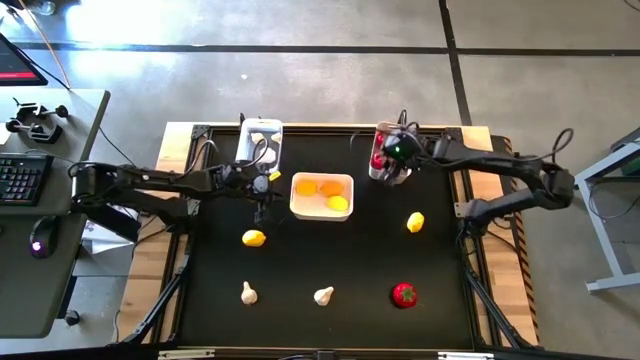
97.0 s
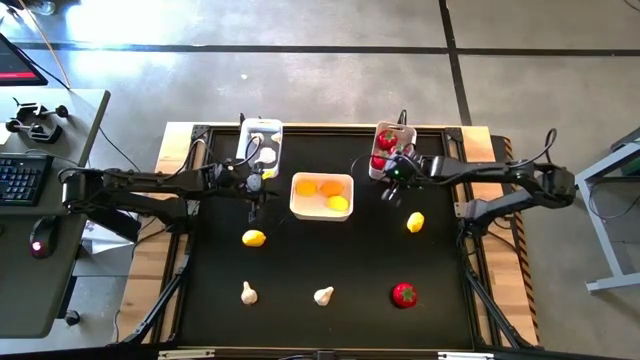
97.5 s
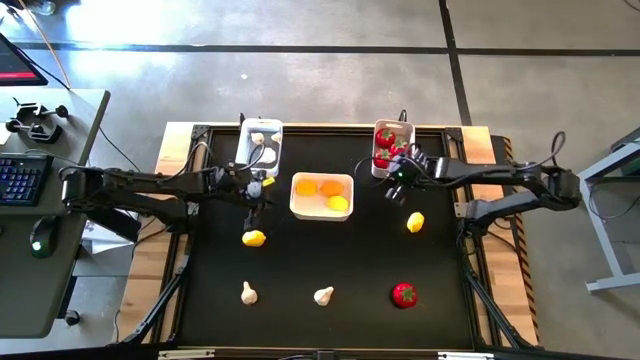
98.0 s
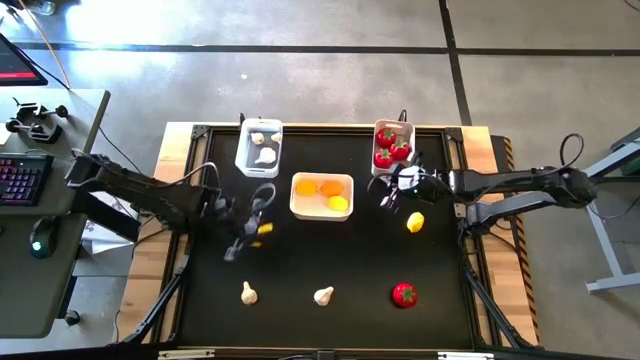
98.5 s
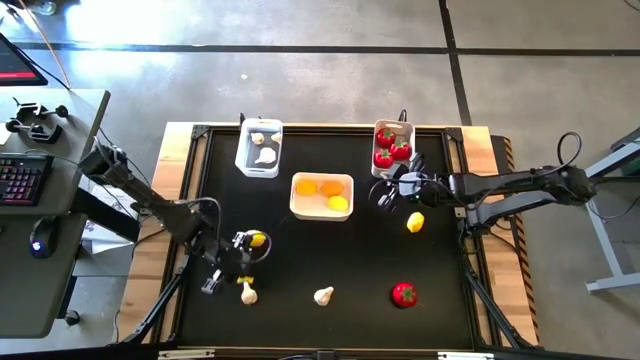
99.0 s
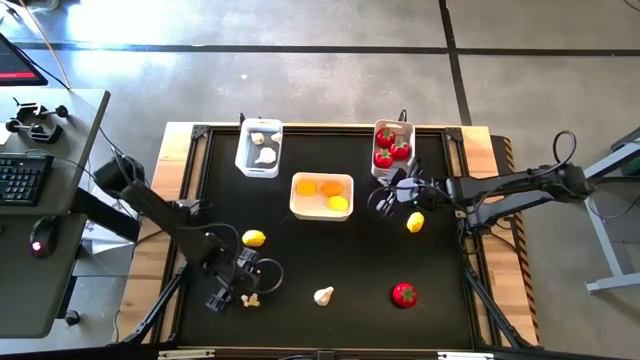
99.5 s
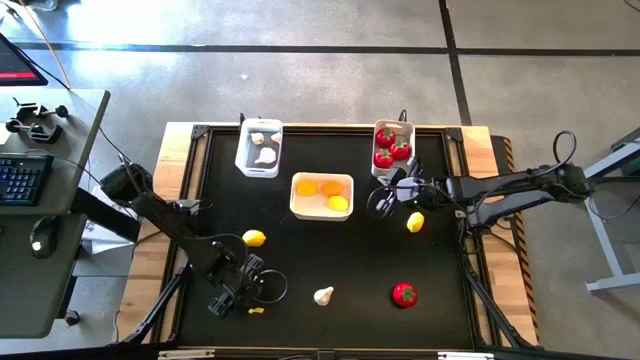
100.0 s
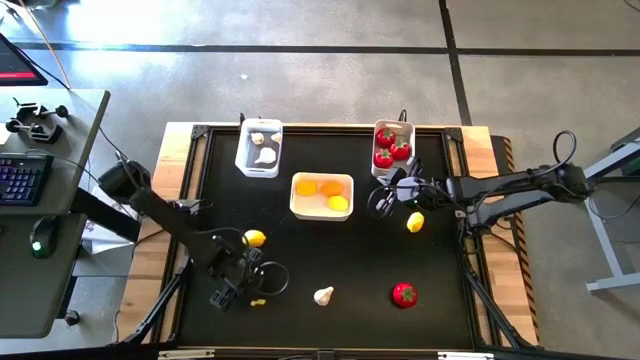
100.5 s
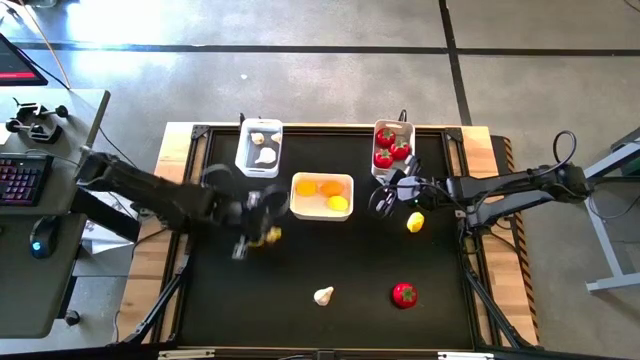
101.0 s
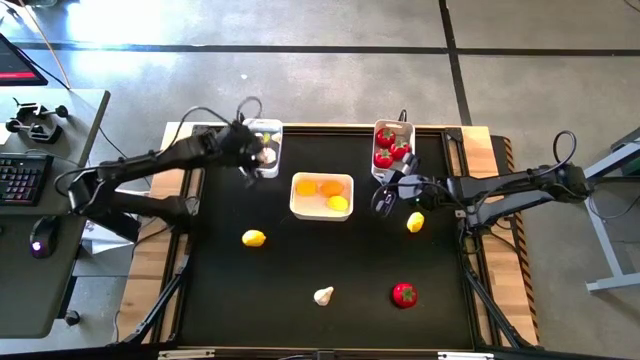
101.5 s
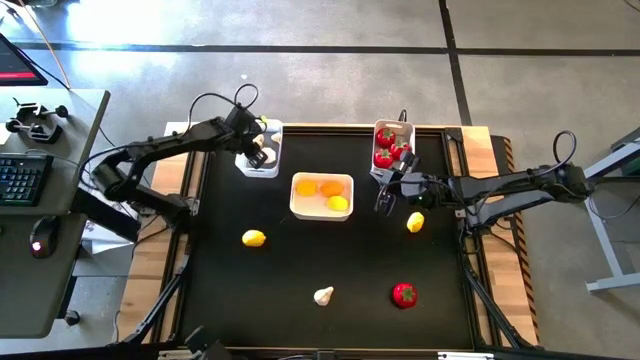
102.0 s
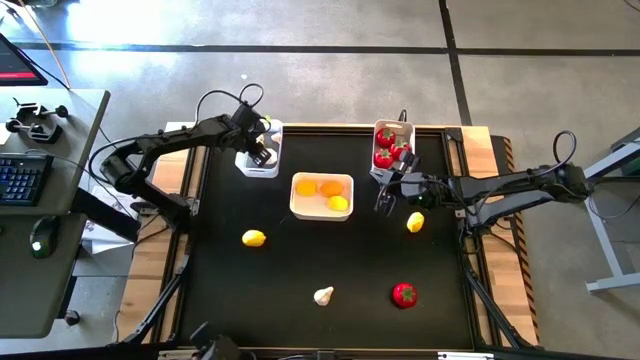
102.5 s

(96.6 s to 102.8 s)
Task: Sort produce into baskets
Put the white garlic into the transparent bin

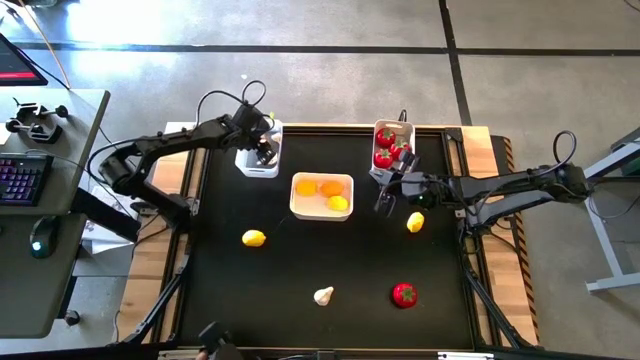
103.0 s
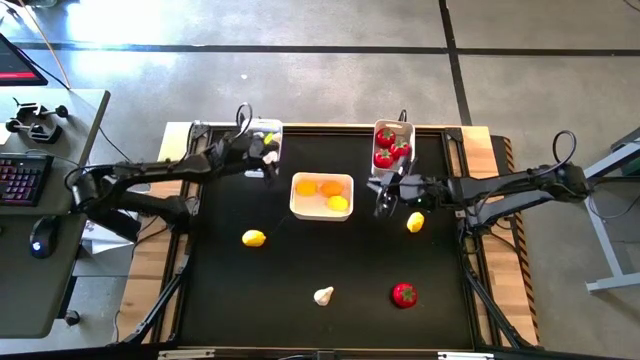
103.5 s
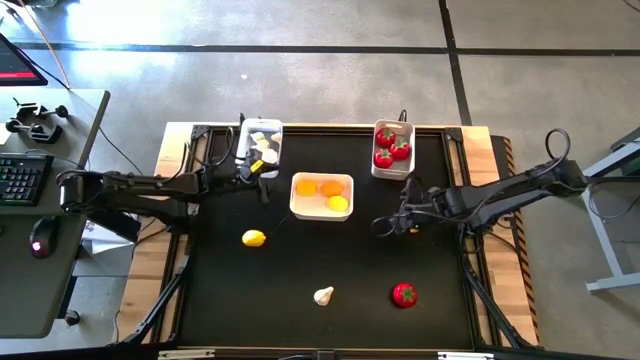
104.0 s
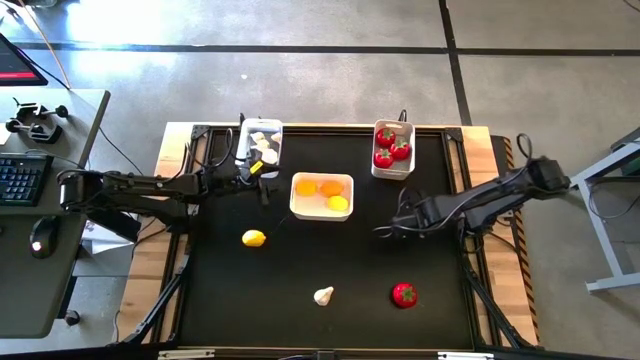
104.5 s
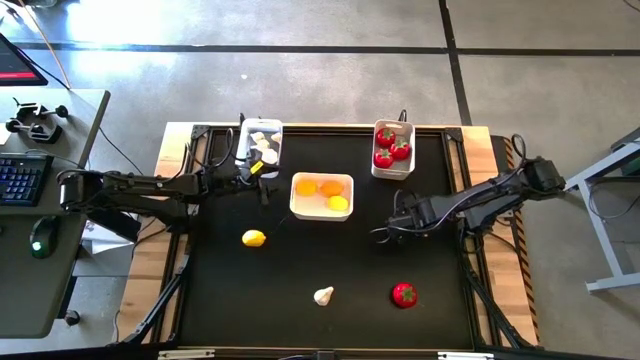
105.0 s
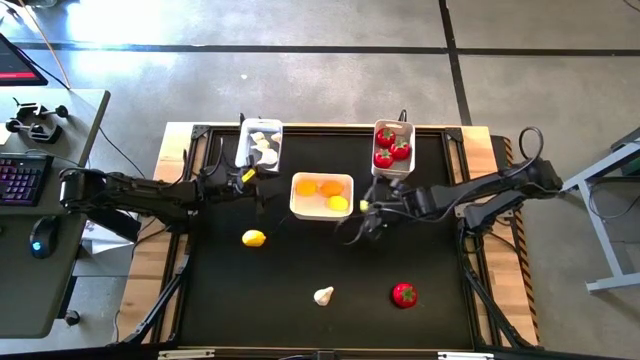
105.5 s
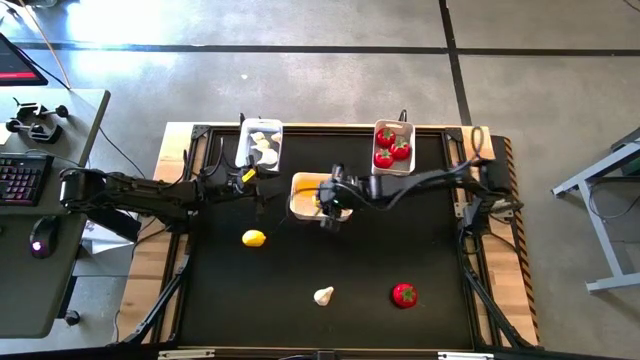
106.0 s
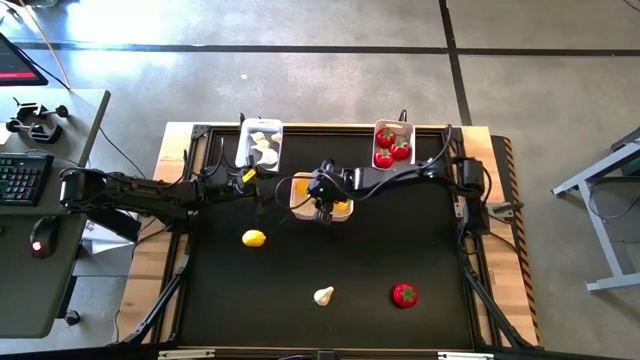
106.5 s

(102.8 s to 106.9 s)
Put the yellow lemon into the white bin

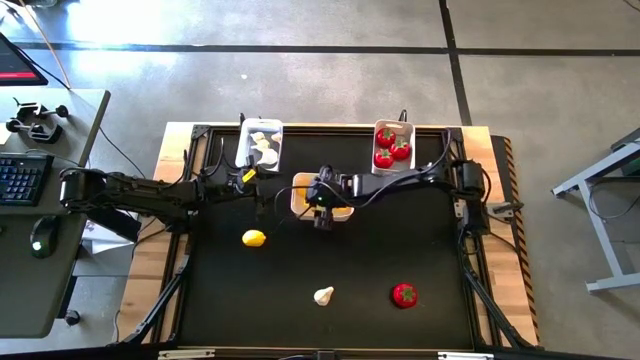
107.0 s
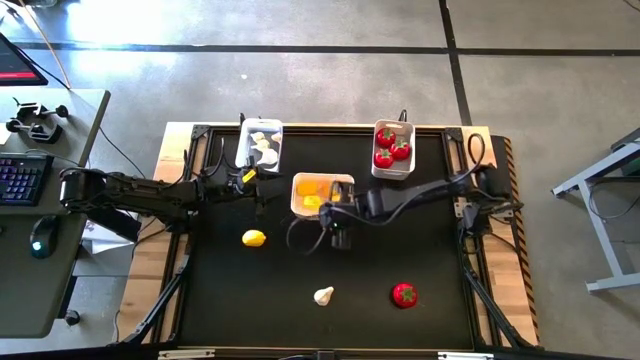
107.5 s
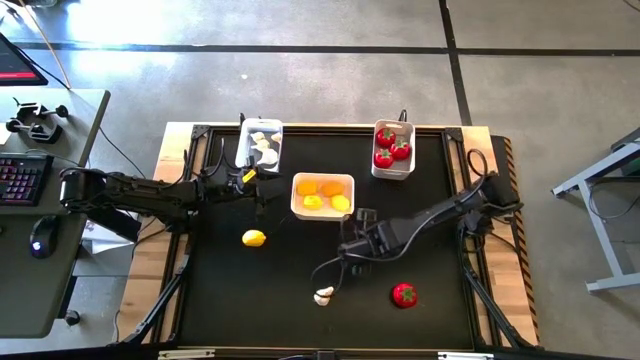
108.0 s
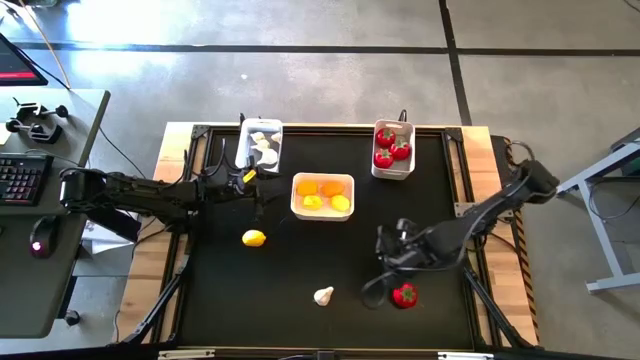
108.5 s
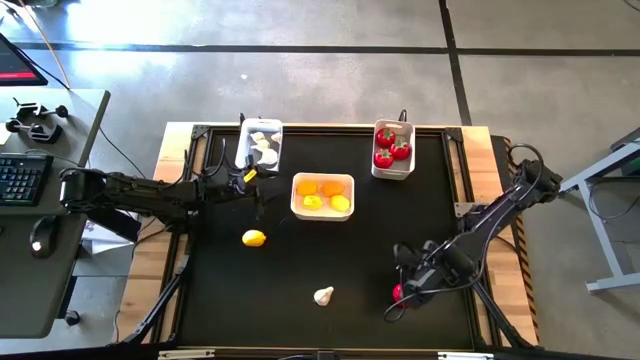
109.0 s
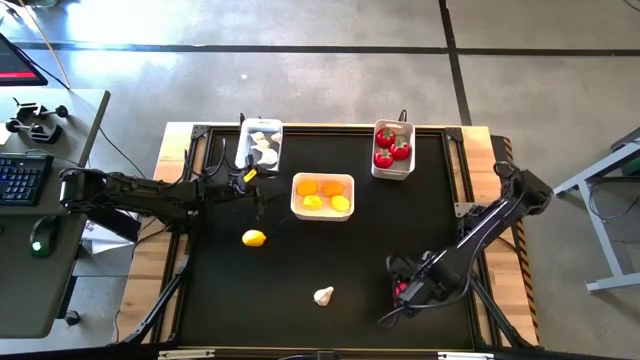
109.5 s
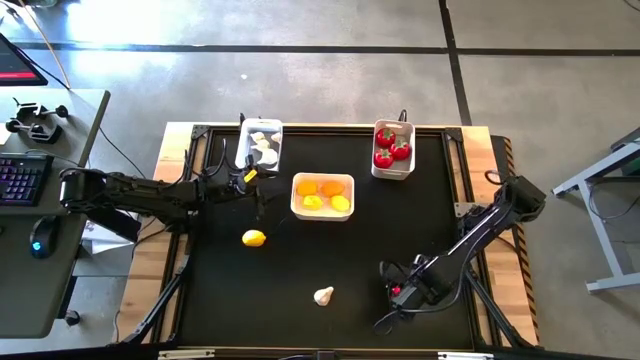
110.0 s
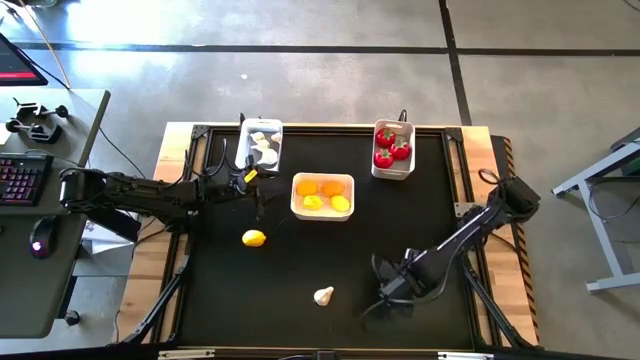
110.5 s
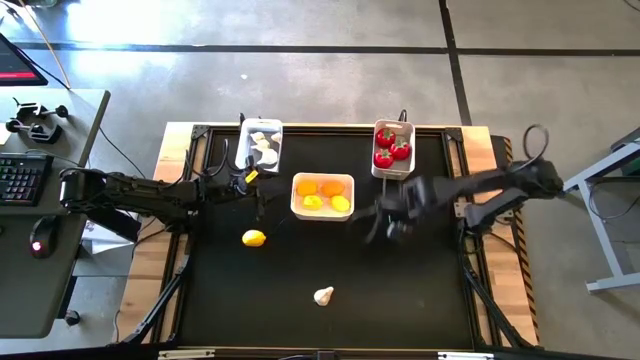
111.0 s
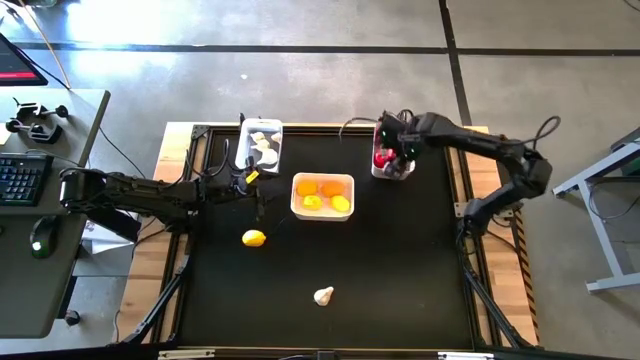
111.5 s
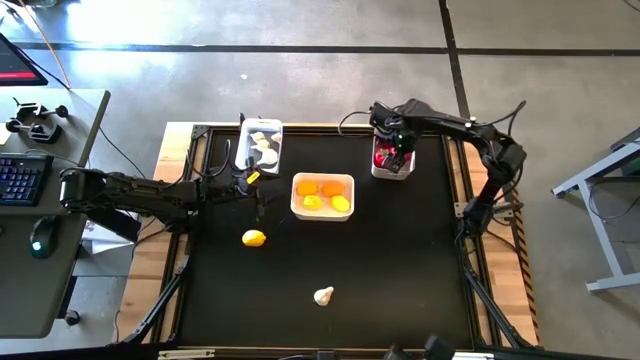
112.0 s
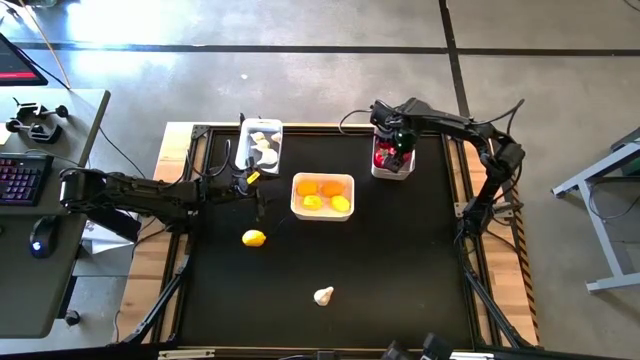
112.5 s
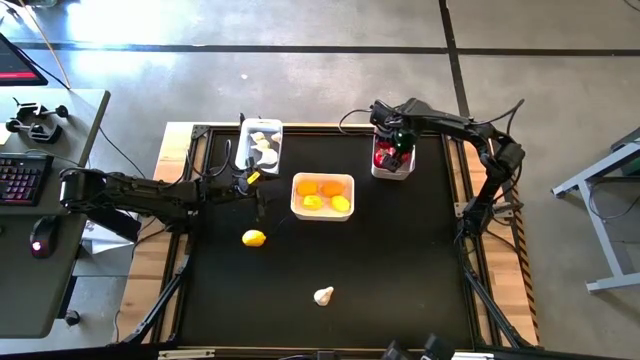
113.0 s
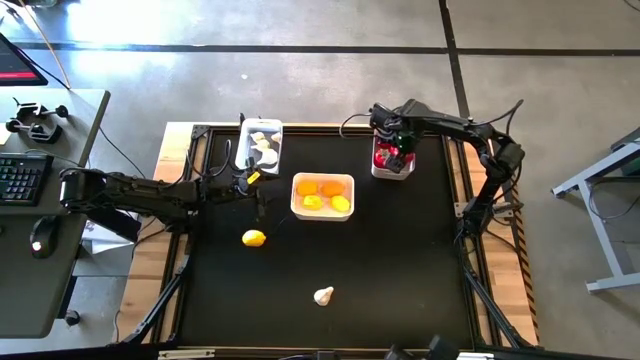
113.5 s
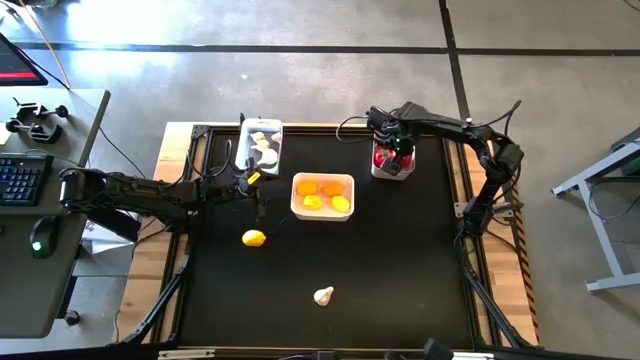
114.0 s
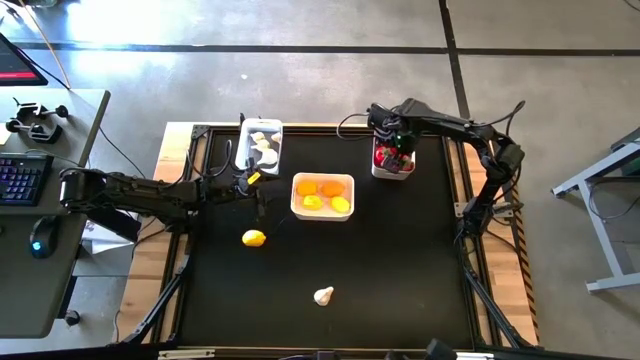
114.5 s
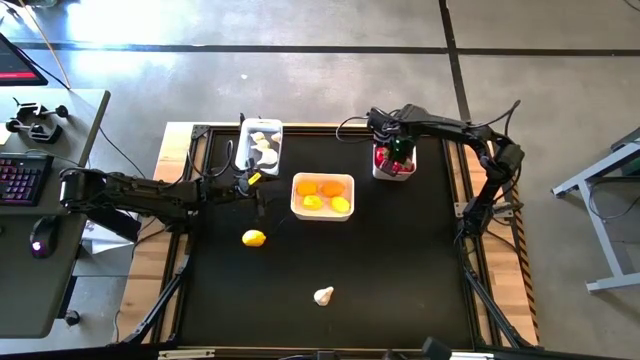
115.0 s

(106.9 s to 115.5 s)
Put the red tomato into the gray bin

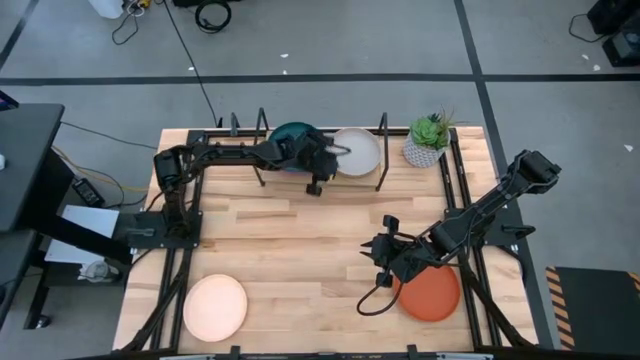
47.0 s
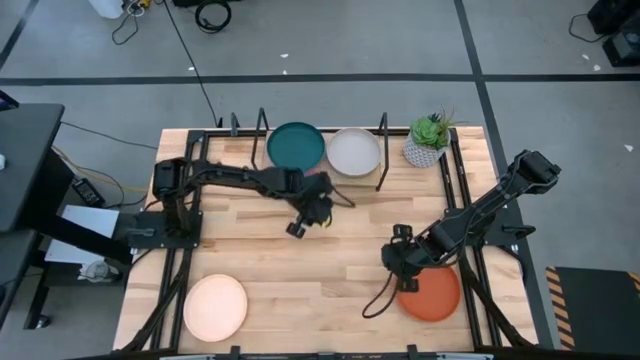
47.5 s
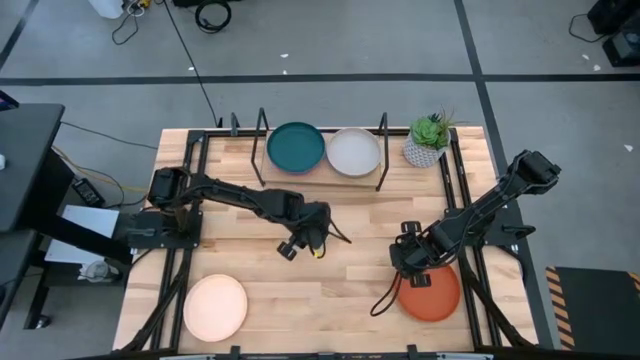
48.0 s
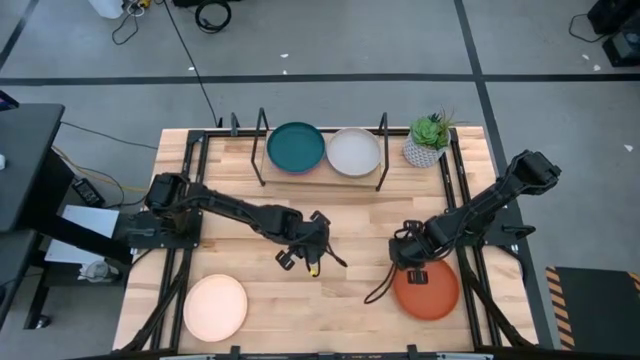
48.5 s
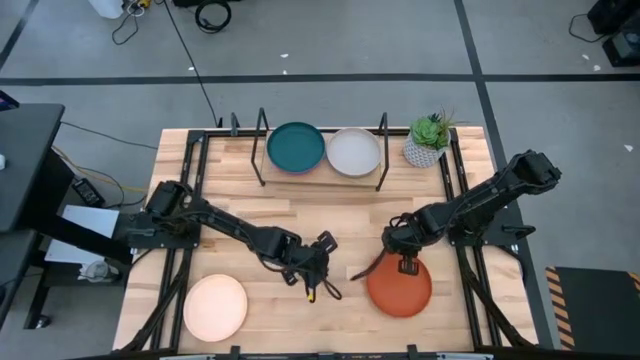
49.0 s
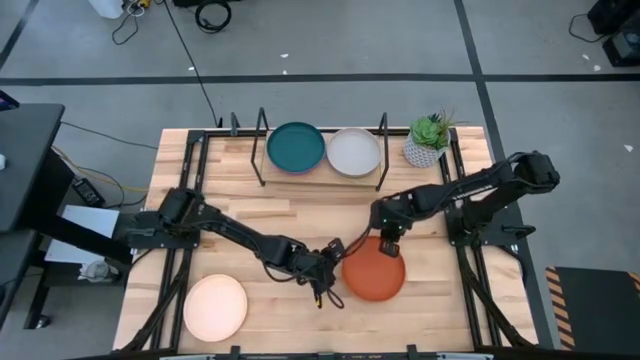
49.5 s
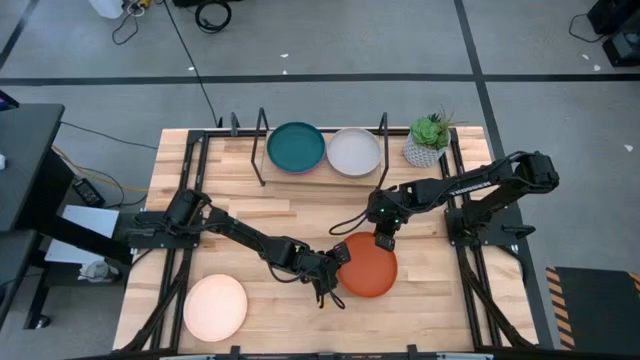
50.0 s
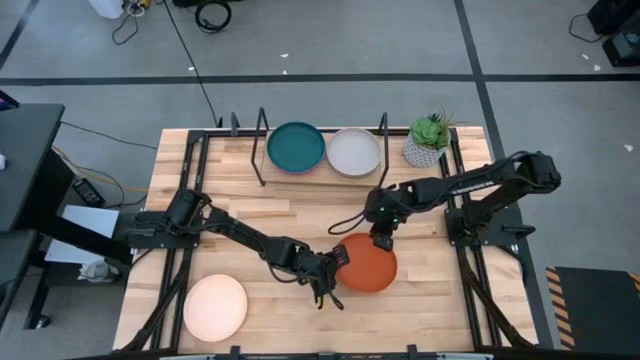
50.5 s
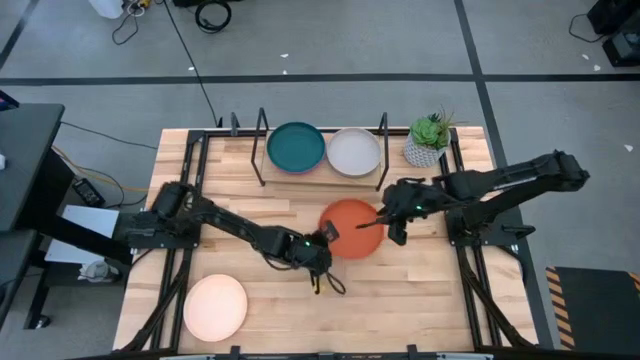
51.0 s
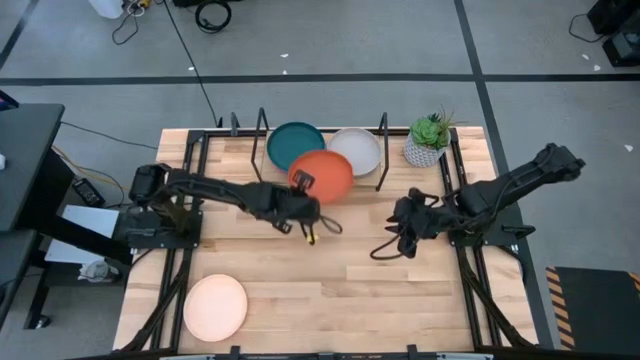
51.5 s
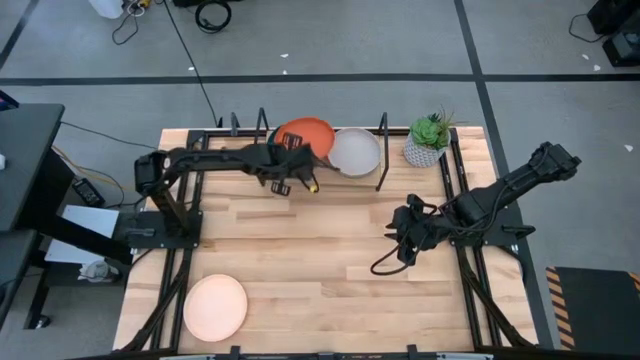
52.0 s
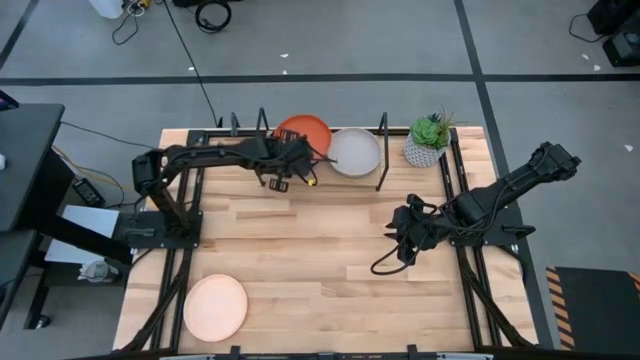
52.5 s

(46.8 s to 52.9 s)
Task: Place and stack plates onto a shelf
Stack the orange plate on top of the dark green plate on the shelf
